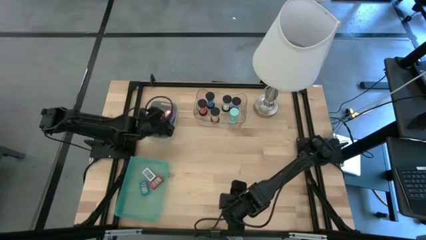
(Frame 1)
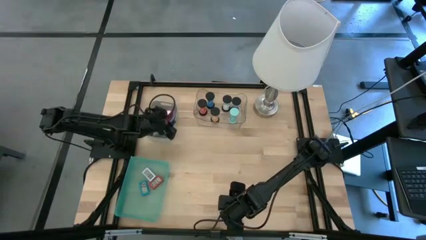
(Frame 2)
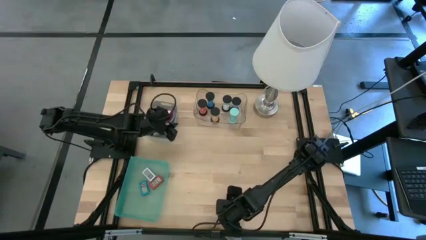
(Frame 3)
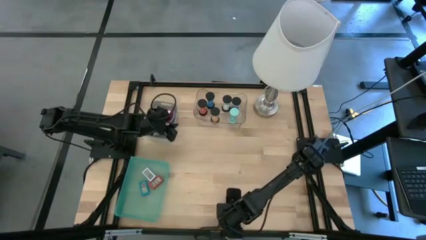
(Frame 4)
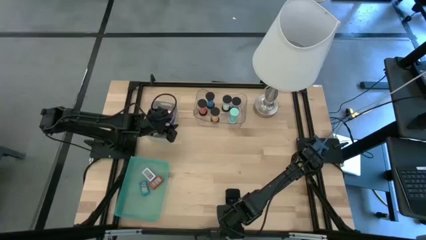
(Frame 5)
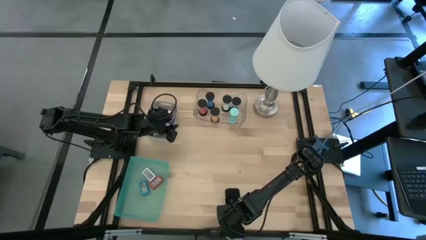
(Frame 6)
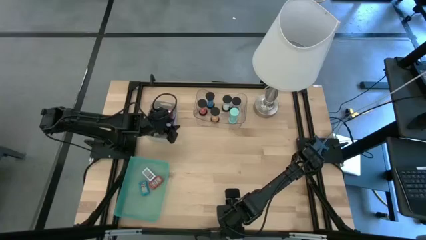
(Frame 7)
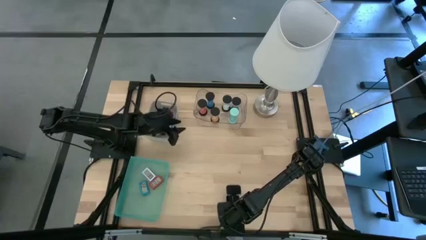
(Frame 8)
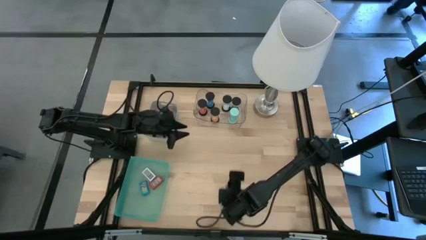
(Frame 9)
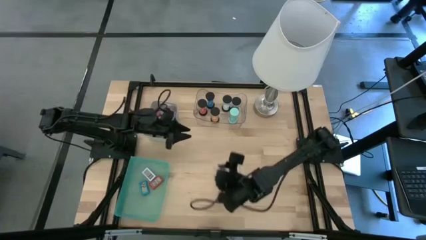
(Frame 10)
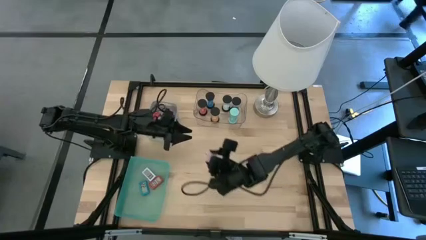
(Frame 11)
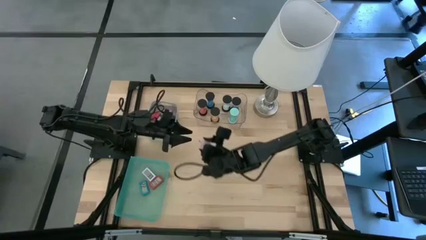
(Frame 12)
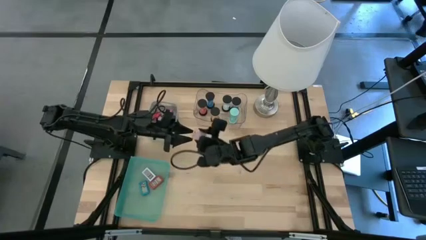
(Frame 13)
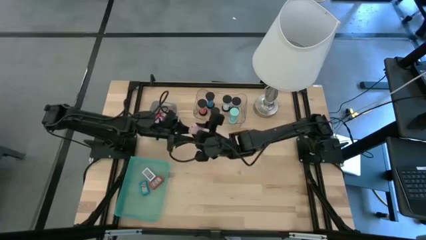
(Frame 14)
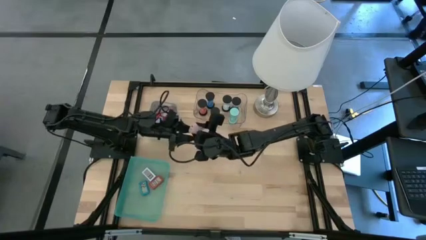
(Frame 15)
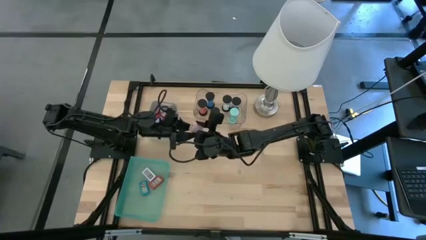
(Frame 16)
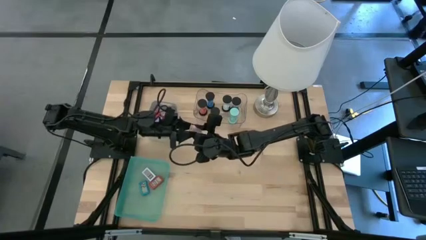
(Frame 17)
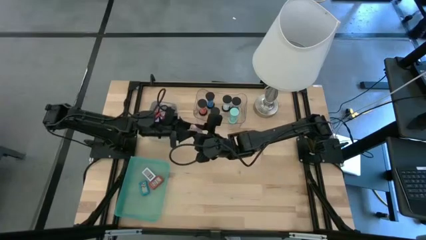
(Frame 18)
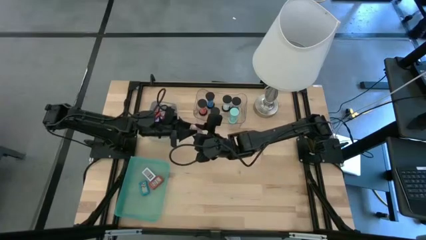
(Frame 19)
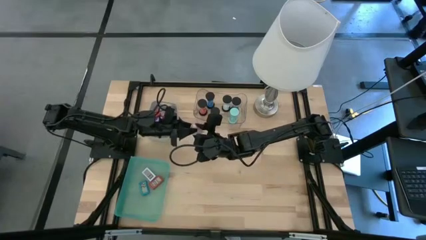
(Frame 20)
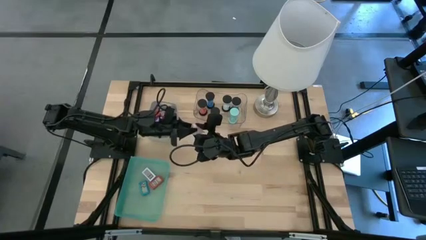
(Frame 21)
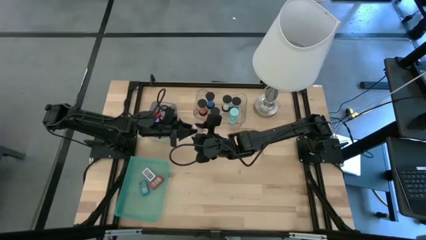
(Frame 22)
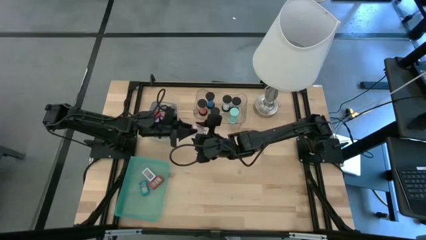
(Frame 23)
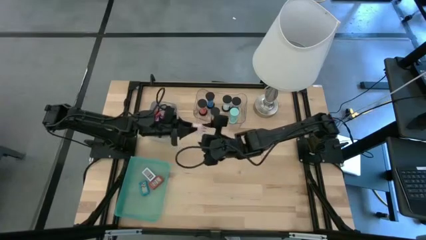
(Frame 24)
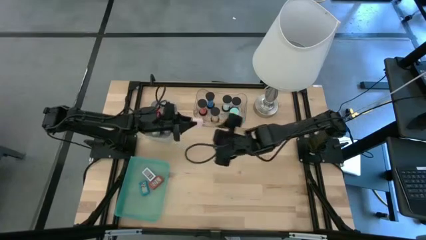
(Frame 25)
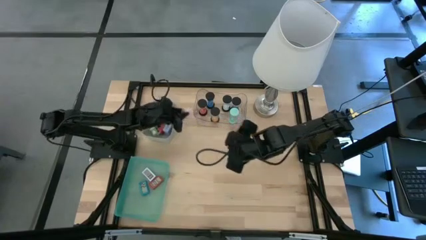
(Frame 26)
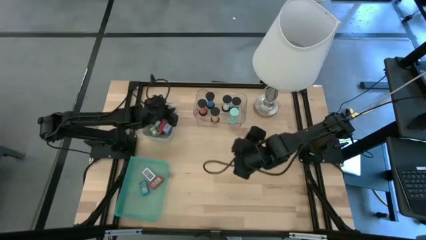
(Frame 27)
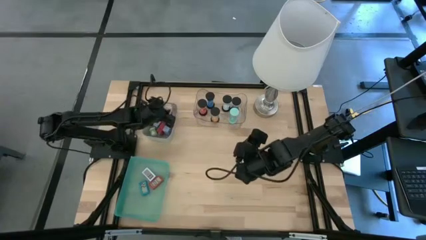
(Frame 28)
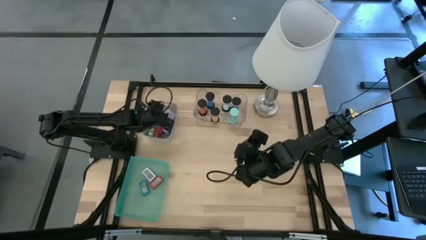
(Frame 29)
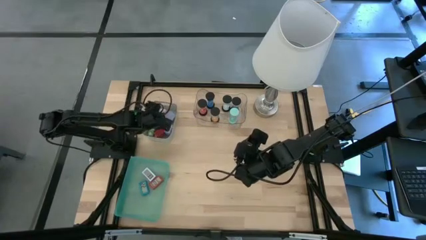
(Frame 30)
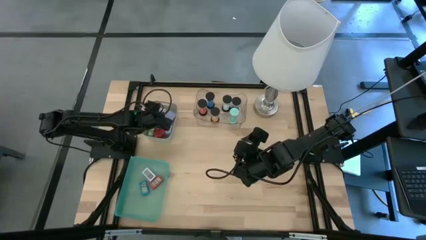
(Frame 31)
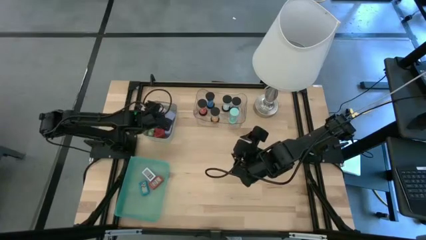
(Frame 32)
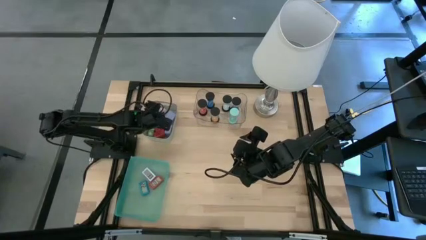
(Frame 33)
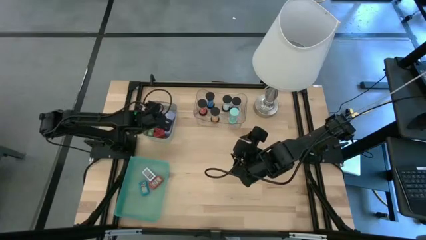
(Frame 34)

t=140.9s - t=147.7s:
Task: Pick & Place Office items
Put the pink charger adapter into the gray bin

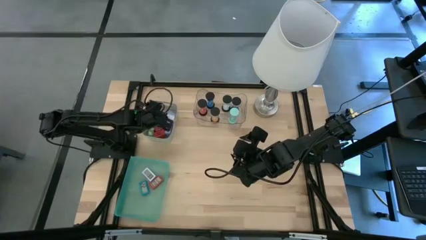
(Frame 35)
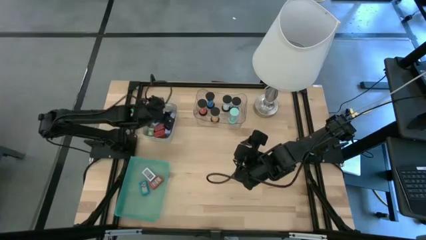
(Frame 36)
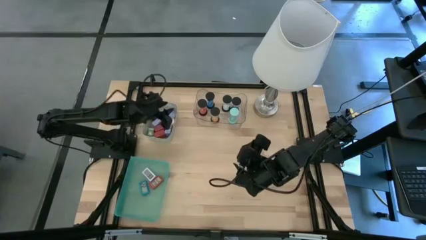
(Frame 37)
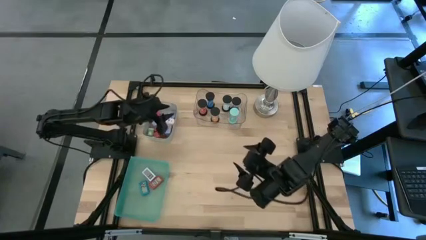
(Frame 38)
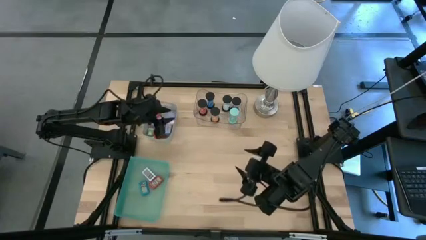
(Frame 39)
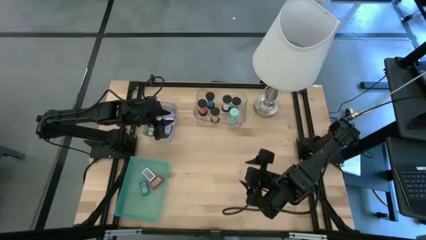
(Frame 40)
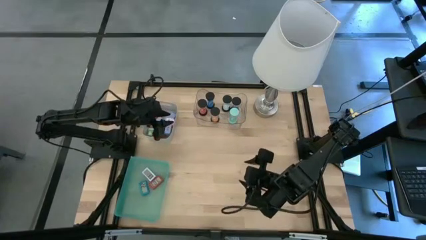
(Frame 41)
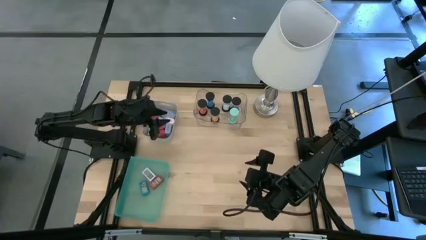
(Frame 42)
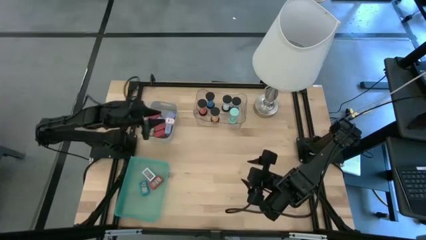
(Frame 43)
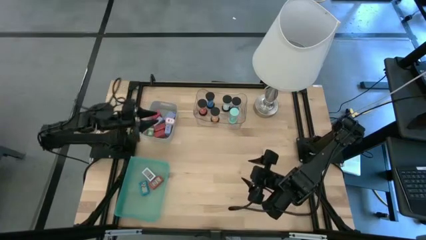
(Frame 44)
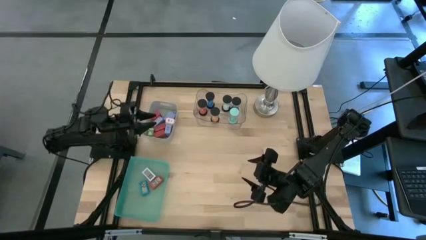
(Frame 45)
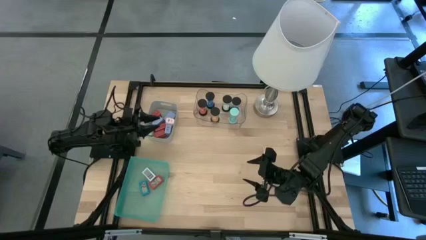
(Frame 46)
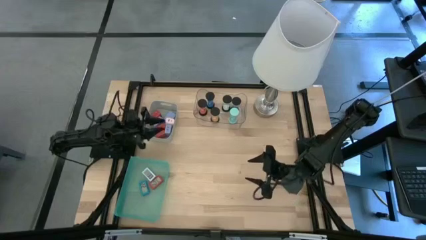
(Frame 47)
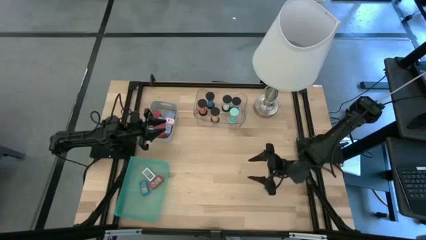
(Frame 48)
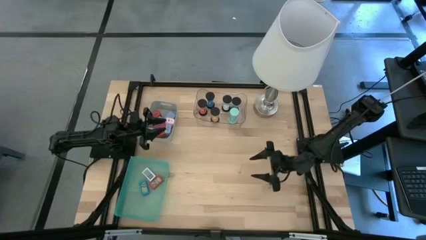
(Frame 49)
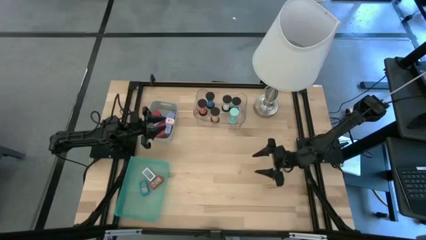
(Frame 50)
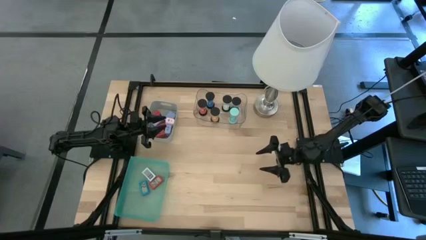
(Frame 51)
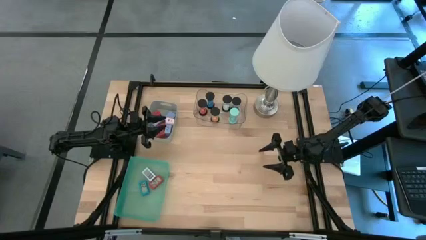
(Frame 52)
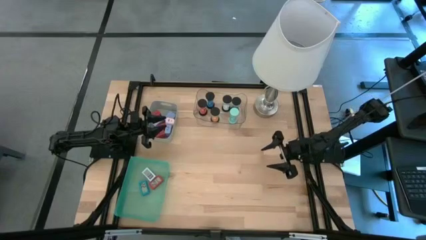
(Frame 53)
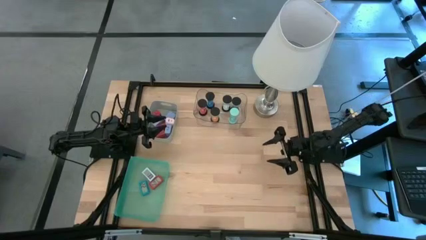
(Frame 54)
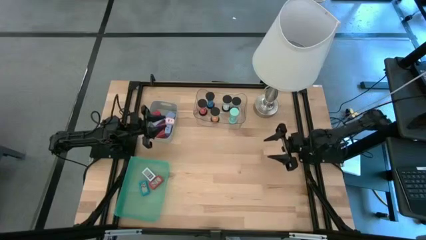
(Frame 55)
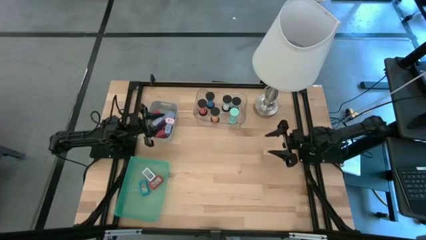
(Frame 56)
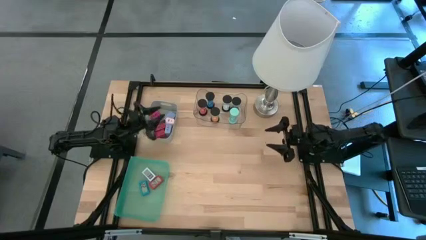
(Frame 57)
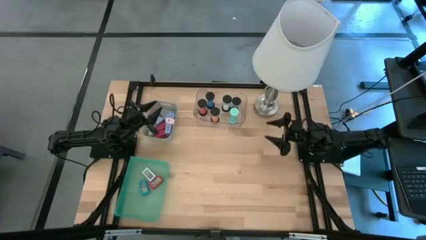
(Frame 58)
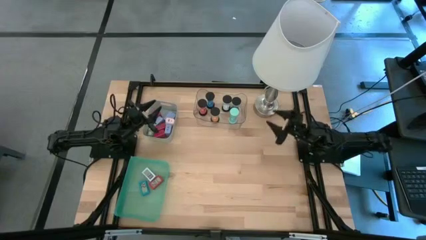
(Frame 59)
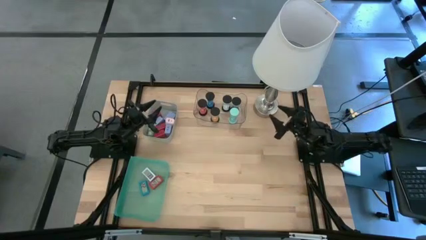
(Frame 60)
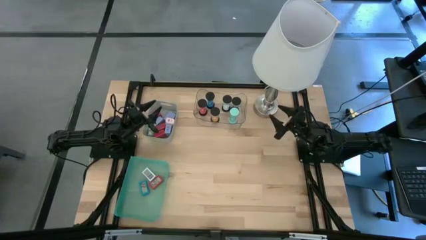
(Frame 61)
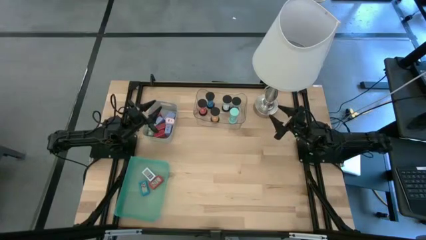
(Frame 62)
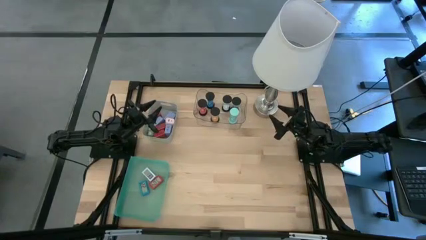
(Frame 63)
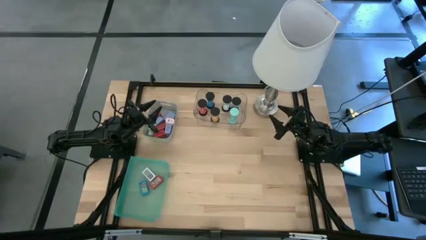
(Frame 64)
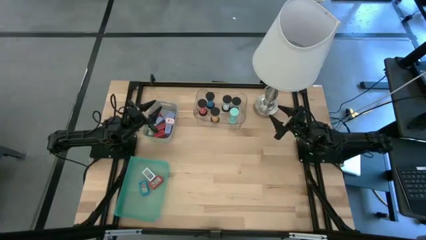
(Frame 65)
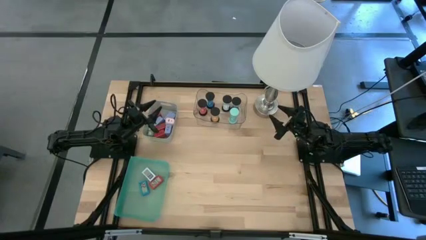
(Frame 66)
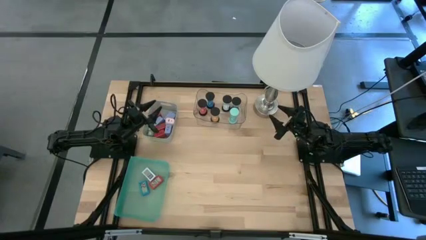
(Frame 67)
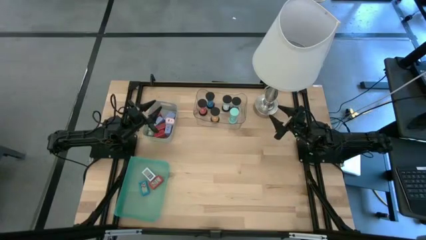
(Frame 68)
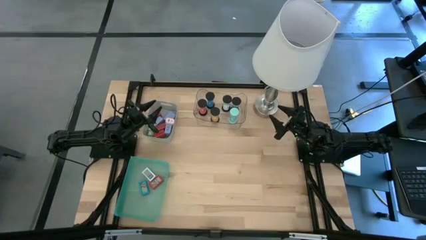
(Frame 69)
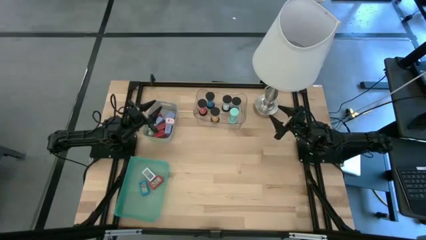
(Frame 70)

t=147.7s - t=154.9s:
Return to Home Position

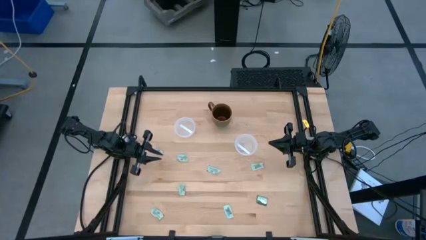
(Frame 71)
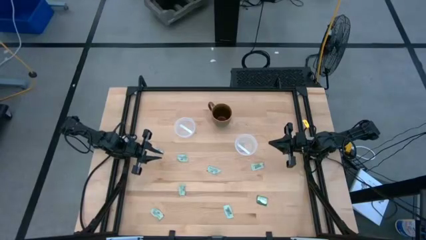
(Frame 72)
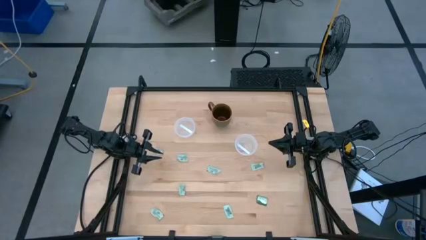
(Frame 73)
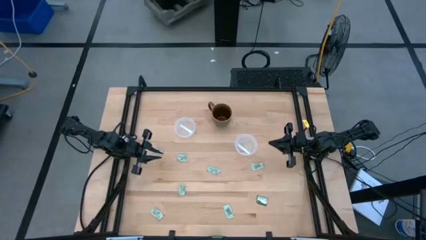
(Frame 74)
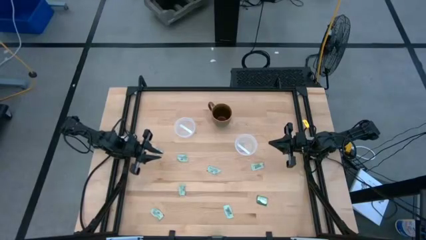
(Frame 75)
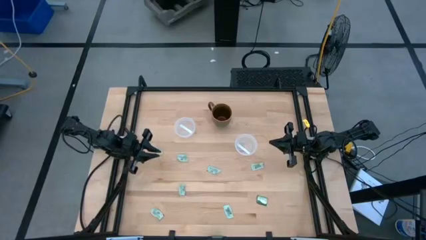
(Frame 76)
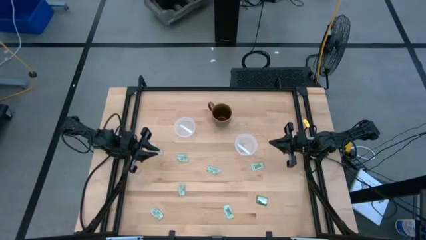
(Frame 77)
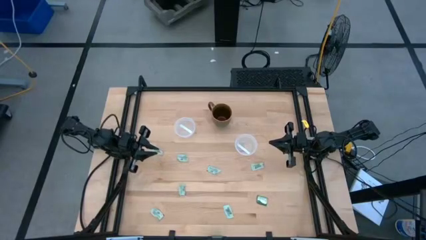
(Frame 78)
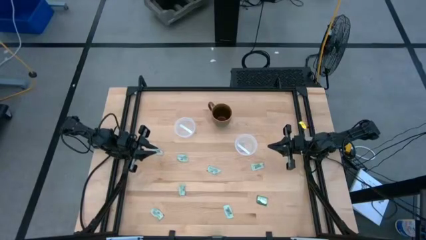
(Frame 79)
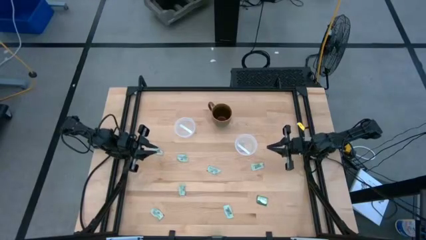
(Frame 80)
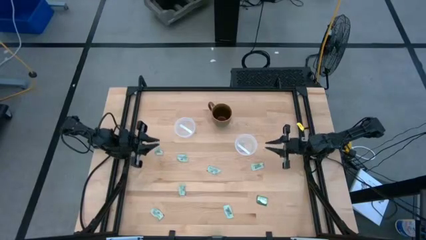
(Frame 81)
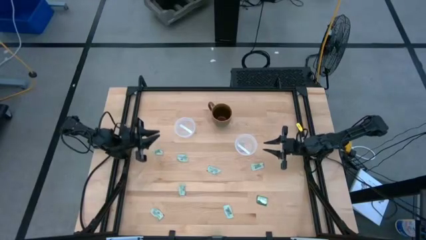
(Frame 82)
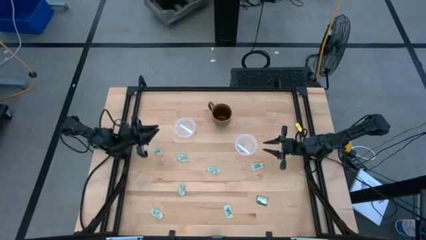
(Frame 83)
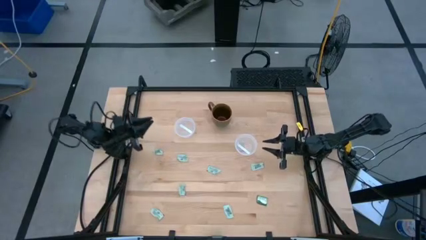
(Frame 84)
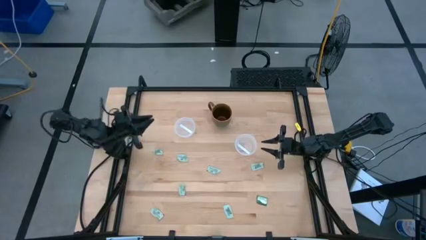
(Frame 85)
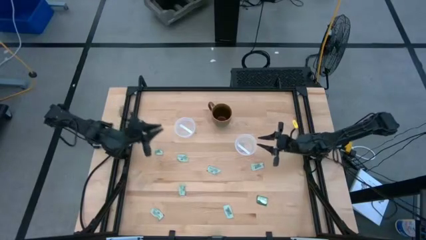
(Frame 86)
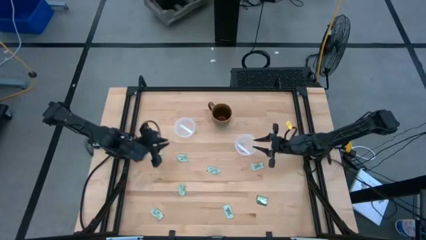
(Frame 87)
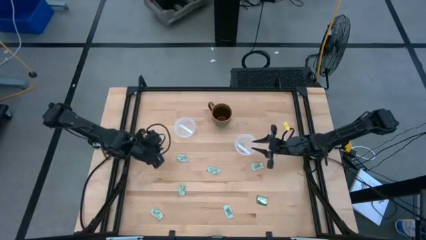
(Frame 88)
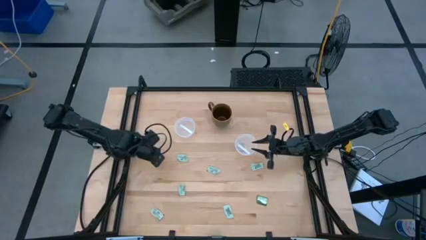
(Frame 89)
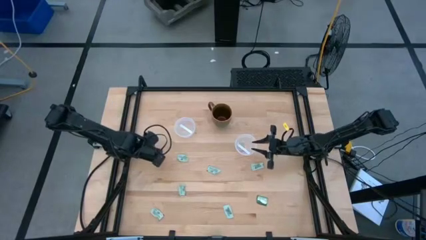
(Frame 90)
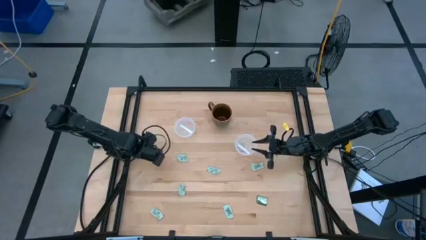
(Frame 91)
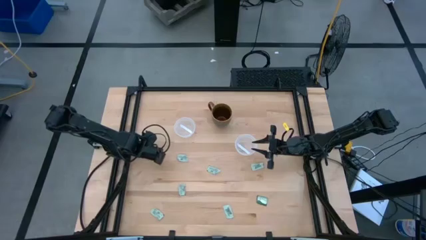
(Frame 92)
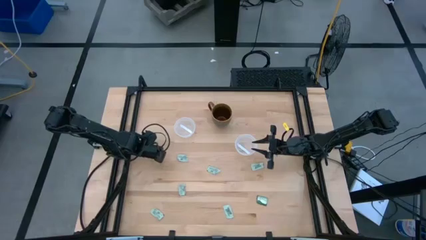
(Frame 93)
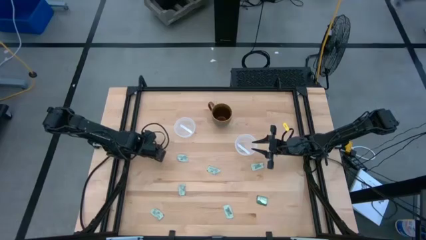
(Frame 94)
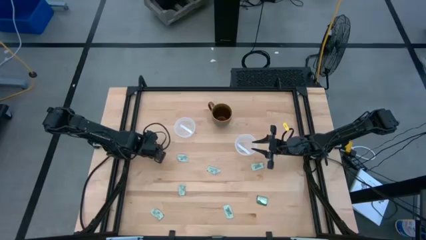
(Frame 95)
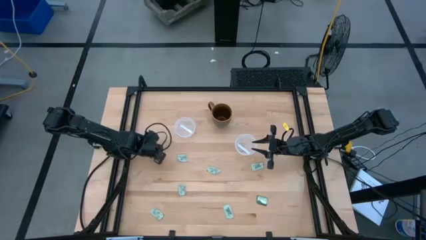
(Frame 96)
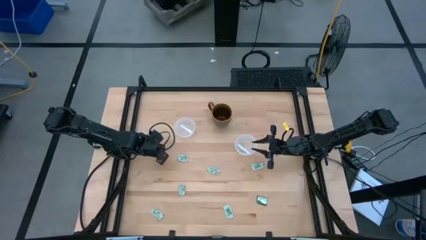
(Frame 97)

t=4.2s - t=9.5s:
Task: Pick and place Stevia / Truvia into bins
Put the white stevia packet into the left round transparent container
